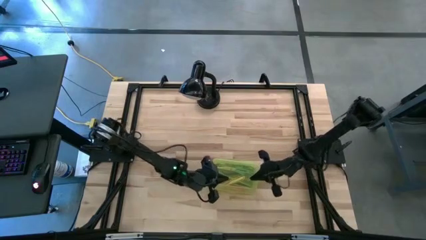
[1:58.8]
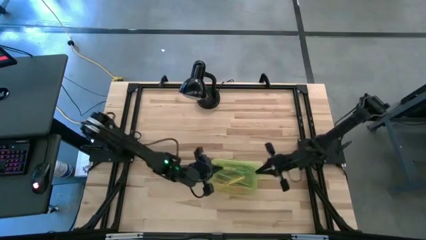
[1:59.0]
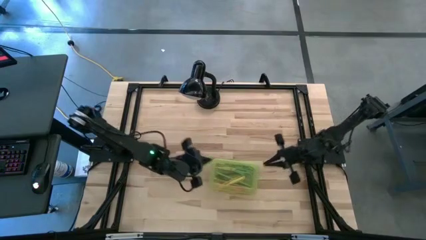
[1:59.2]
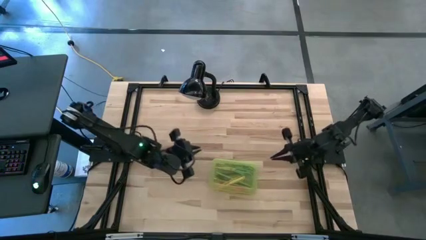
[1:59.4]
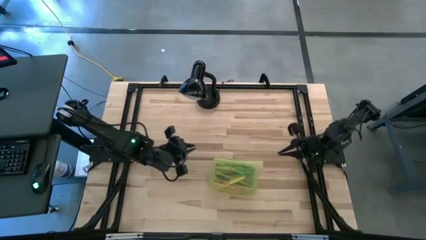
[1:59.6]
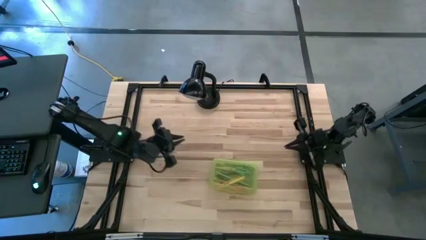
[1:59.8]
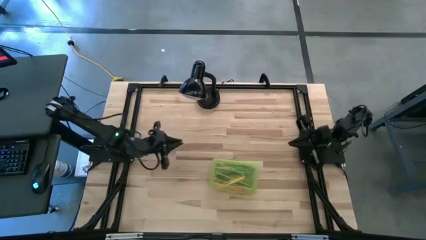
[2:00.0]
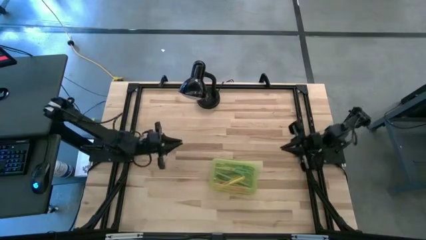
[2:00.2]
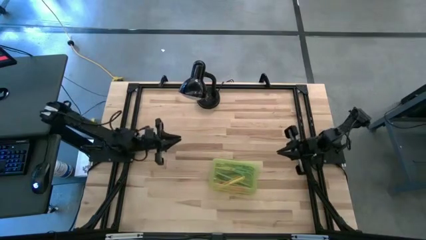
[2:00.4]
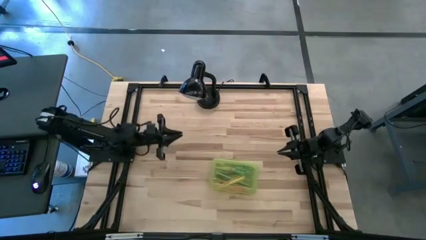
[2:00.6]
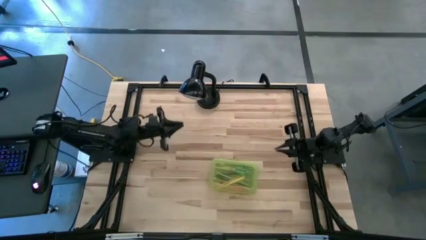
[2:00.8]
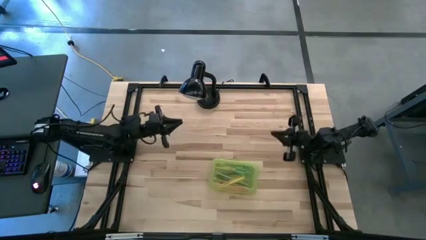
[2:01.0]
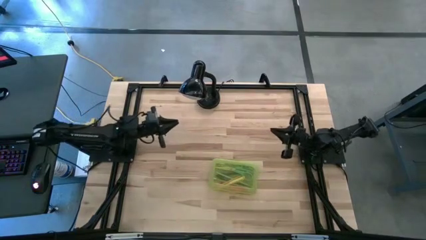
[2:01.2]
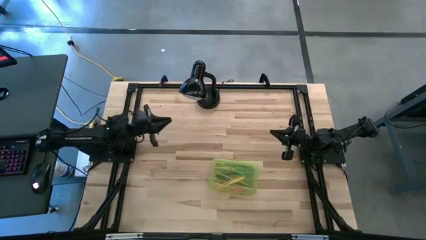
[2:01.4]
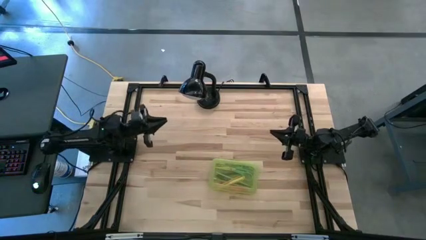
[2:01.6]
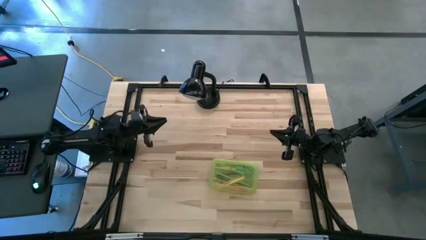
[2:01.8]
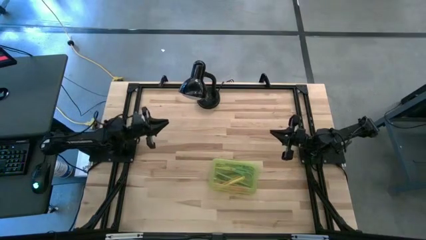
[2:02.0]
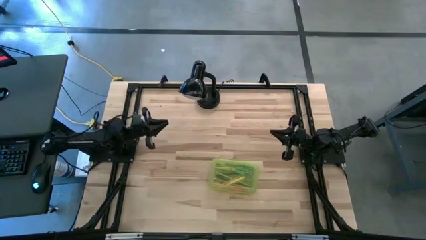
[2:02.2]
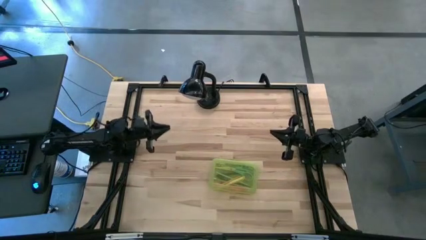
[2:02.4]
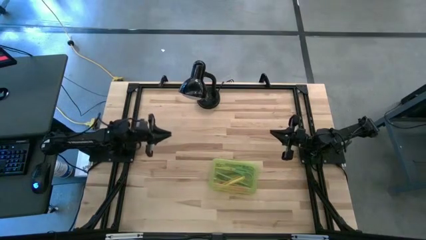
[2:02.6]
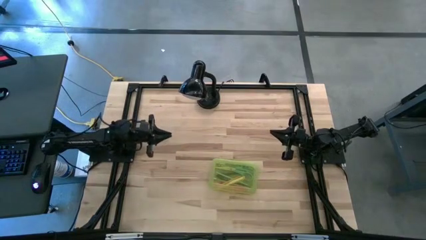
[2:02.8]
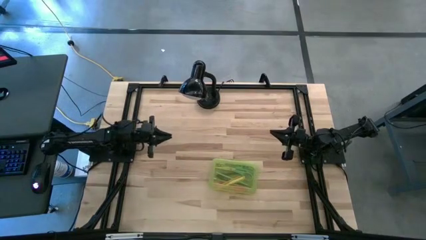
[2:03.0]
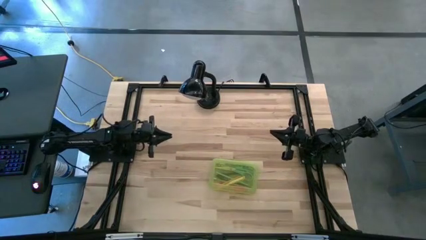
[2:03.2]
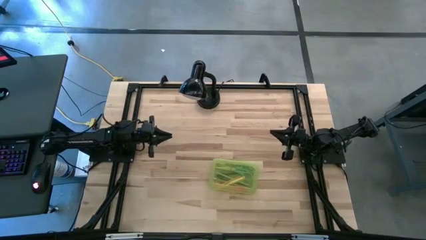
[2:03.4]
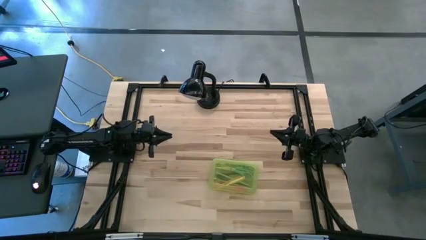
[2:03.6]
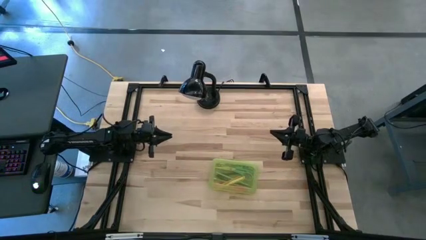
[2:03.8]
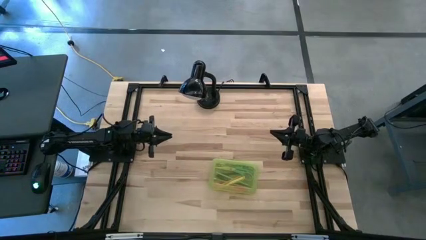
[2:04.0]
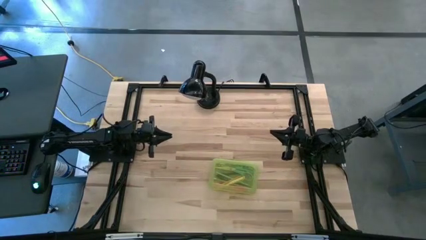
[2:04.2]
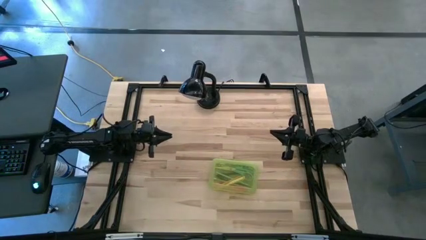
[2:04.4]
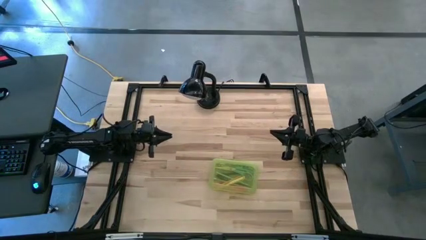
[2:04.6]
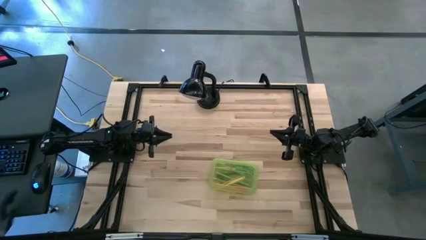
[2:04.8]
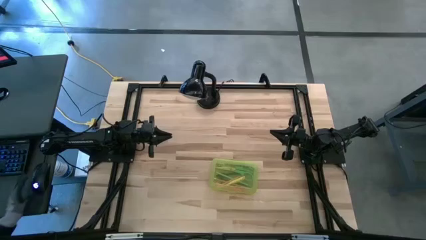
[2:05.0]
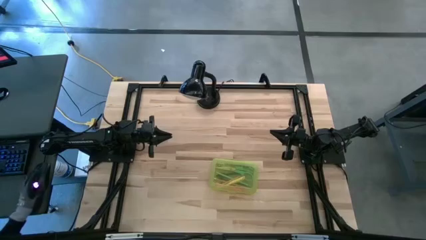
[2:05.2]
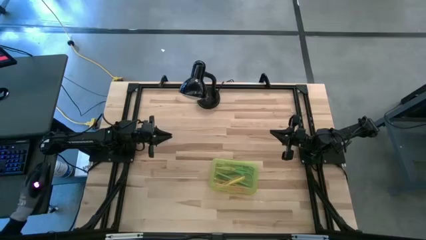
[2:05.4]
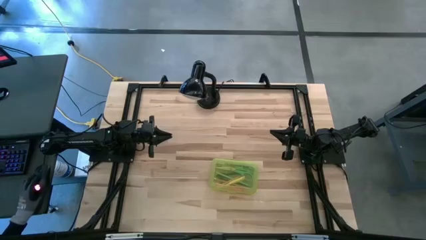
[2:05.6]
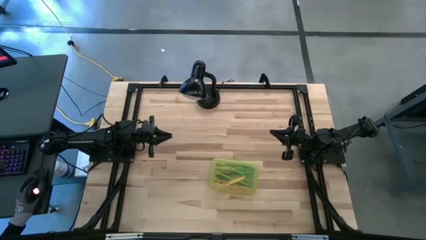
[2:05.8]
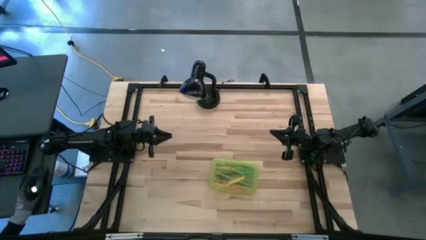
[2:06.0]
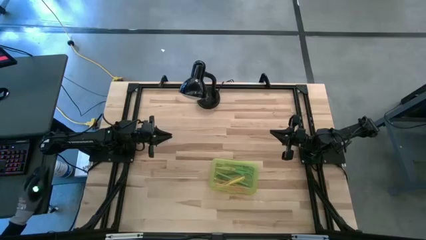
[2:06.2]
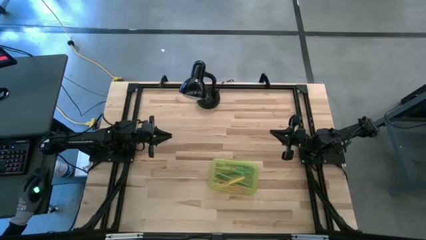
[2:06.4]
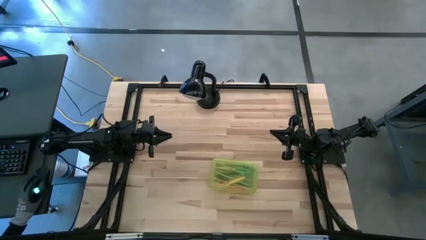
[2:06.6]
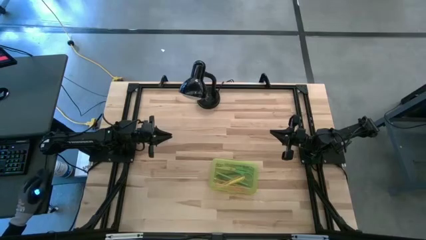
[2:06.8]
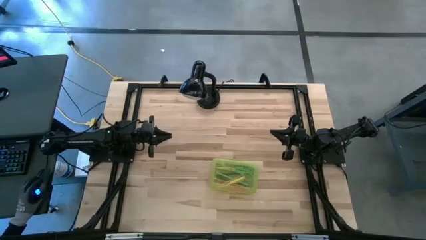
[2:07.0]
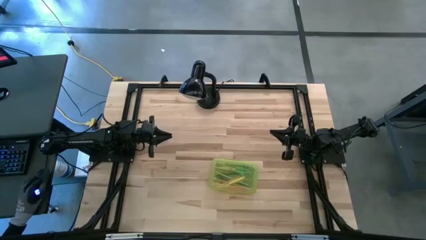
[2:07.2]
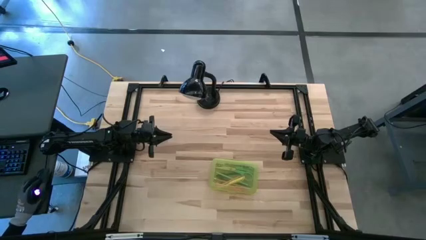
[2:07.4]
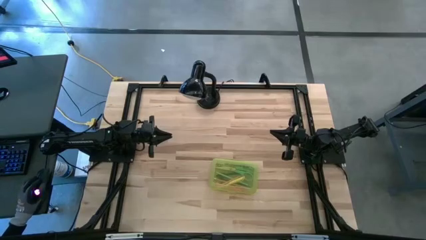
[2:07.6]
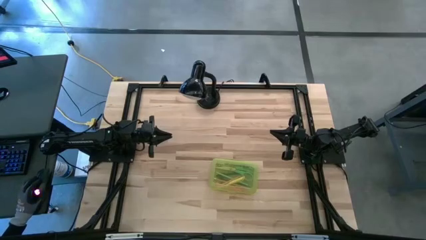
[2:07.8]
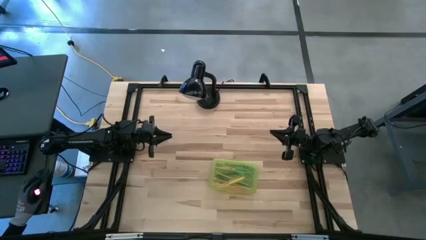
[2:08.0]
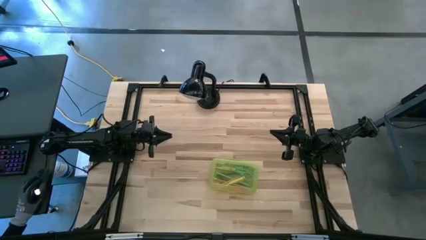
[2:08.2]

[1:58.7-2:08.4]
Task: Pick & place school supplies into a supply box
Return to Home Position

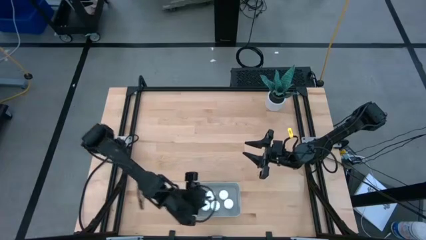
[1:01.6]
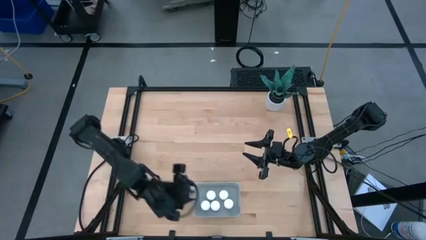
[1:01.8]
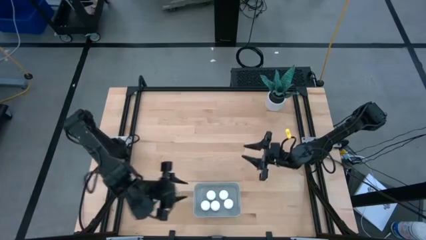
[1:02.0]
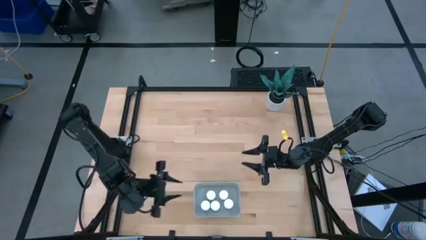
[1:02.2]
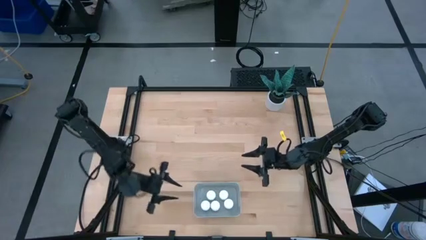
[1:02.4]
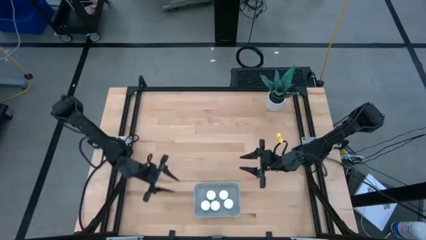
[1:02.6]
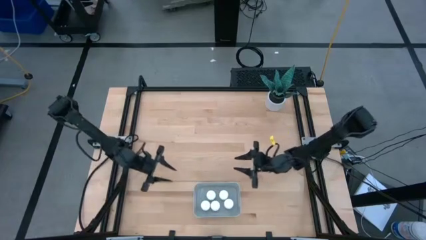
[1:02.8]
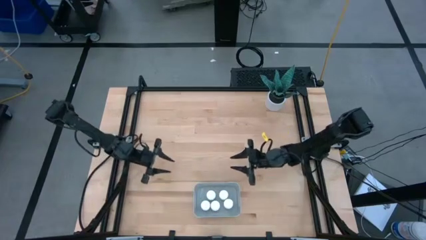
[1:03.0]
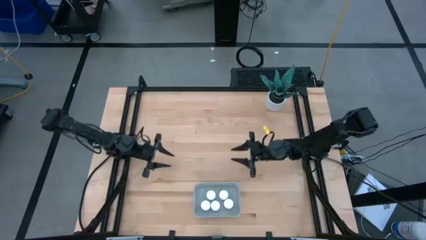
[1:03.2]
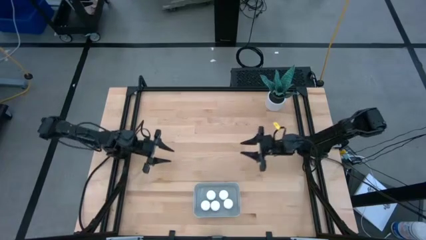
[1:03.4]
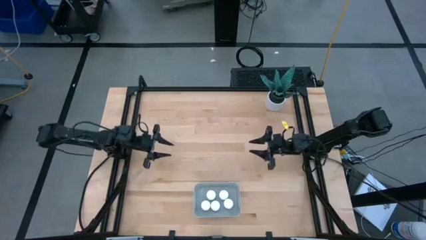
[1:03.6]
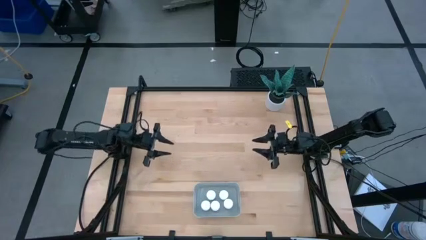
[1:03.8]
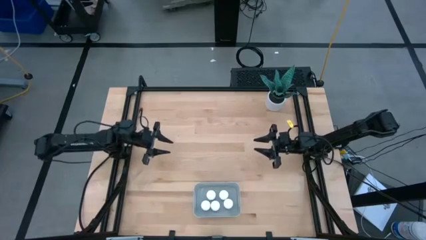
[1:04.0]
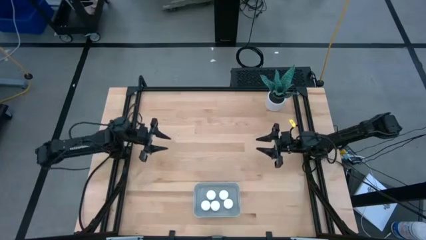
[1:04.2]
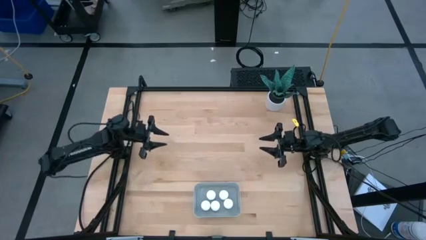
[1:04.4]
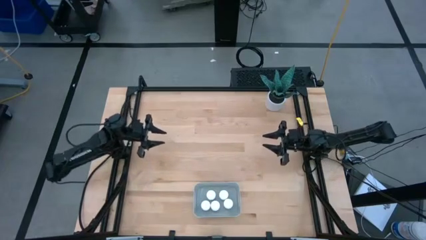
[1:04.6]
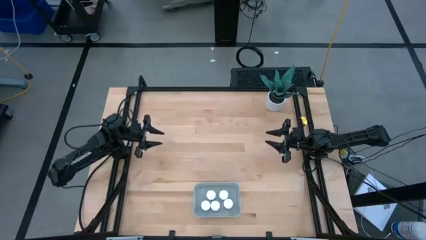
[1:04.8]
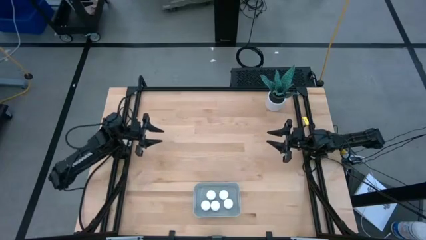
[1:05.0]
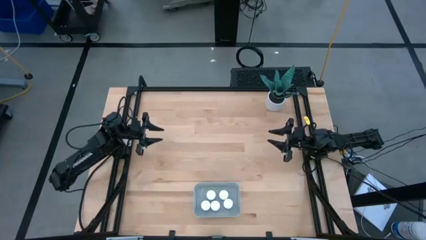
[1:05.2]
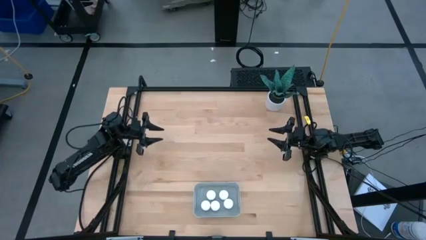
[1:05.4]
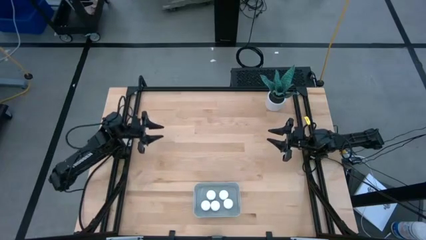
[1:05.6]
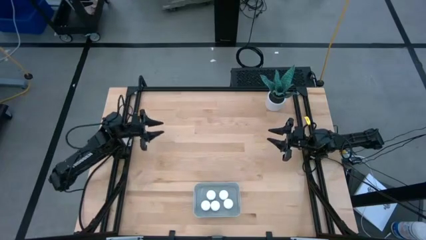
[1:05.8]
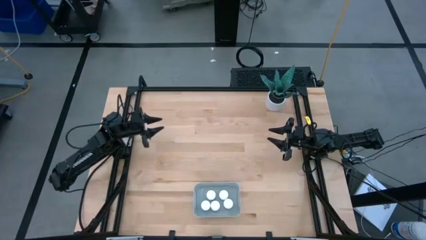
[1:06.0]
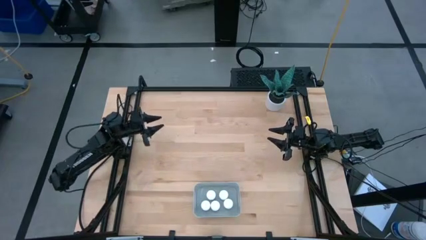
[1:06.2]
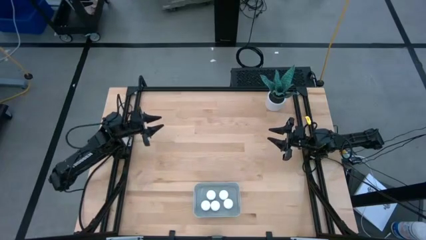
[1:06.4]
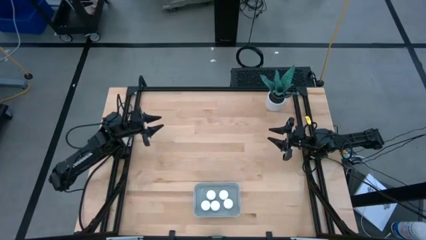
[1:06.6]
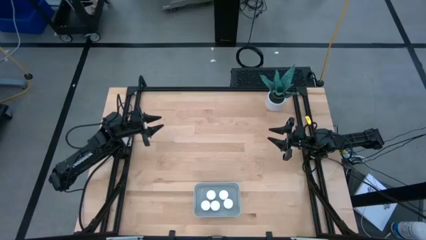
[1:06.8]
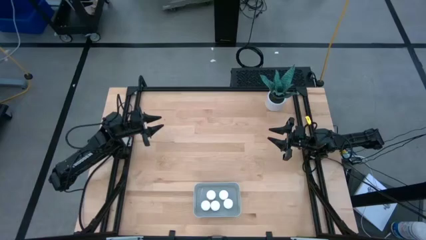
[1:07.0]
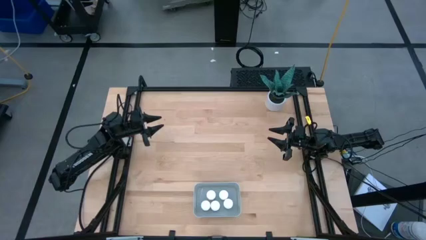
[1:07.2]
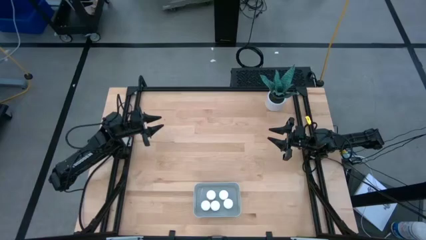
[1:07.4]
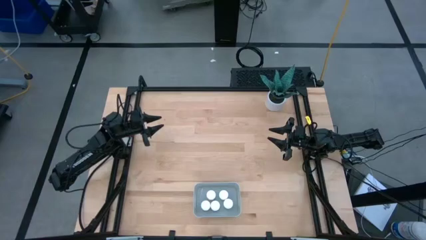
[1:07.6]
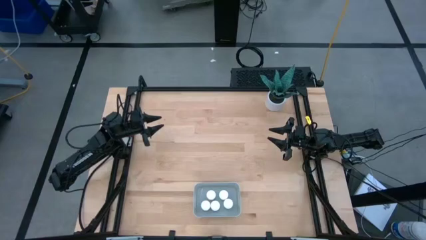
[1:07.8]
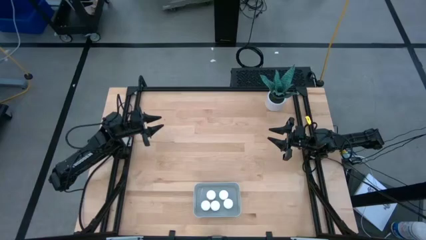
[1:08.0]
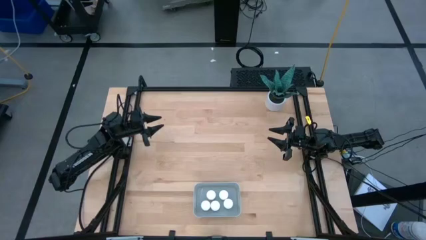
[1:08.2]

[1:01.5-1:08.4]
Task: Pick and place pill bottles into a basket
Return to Home Position
